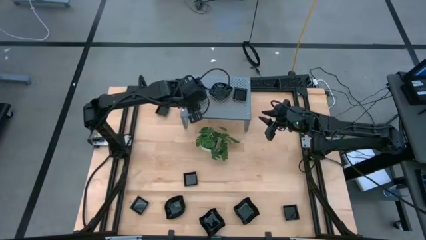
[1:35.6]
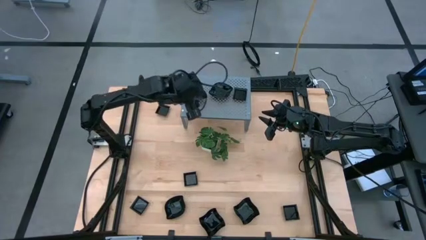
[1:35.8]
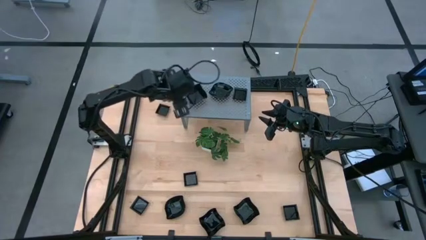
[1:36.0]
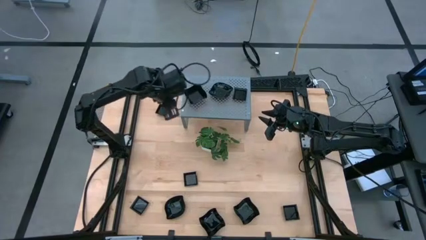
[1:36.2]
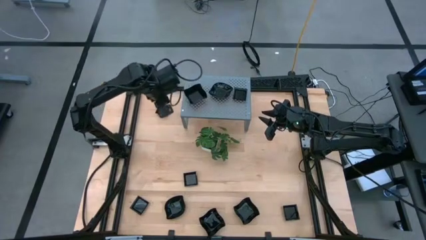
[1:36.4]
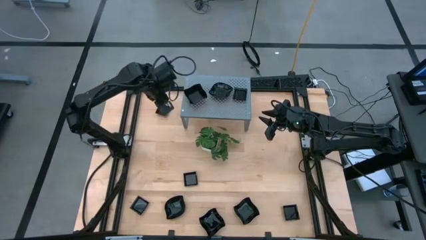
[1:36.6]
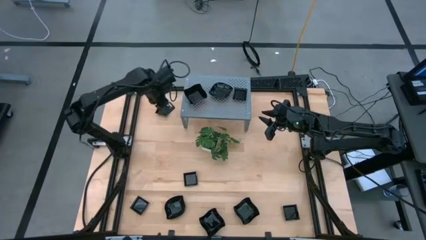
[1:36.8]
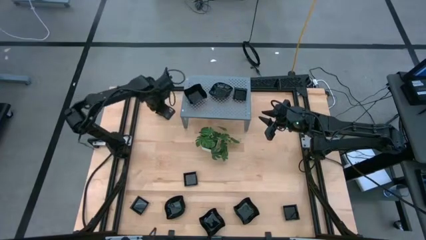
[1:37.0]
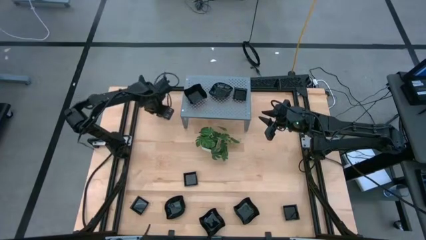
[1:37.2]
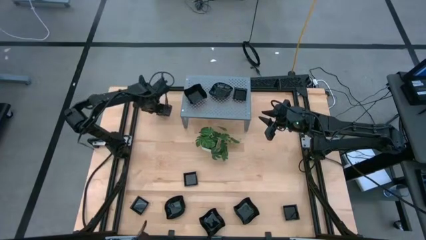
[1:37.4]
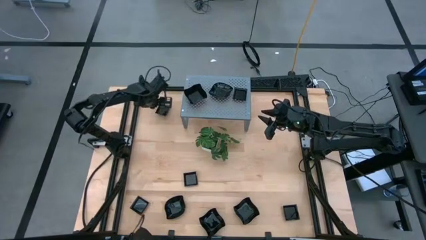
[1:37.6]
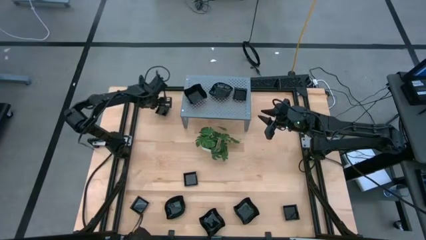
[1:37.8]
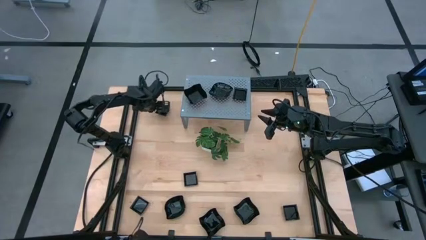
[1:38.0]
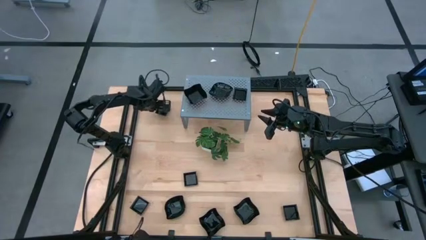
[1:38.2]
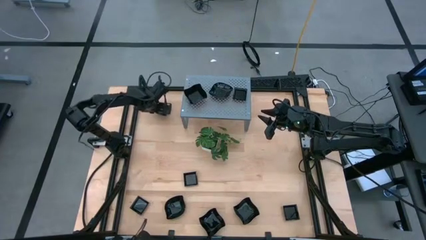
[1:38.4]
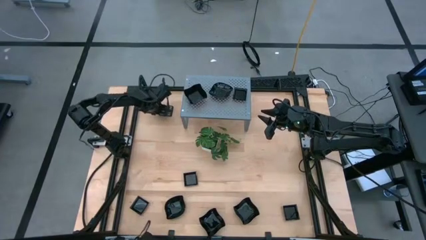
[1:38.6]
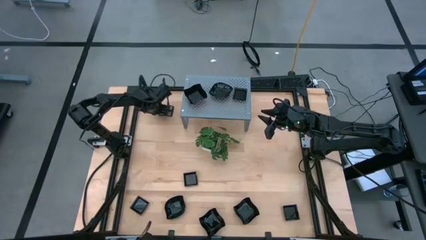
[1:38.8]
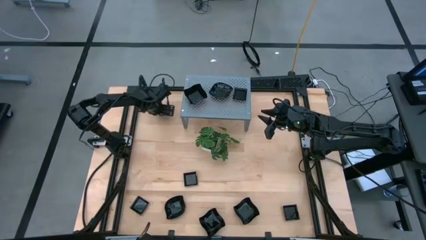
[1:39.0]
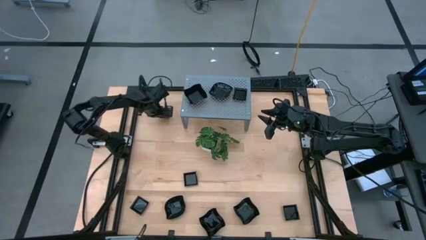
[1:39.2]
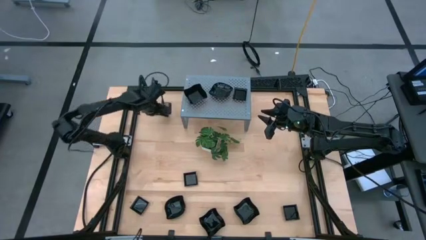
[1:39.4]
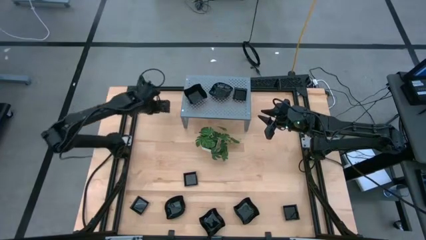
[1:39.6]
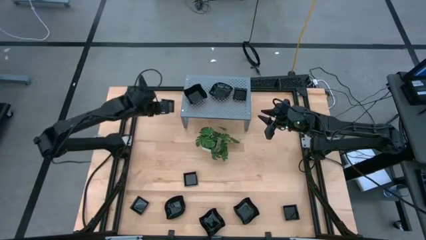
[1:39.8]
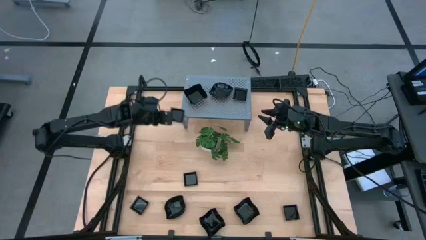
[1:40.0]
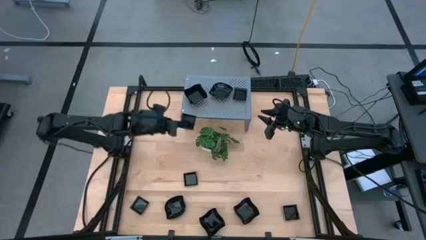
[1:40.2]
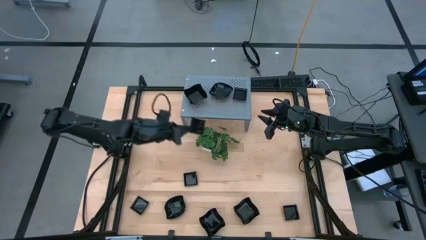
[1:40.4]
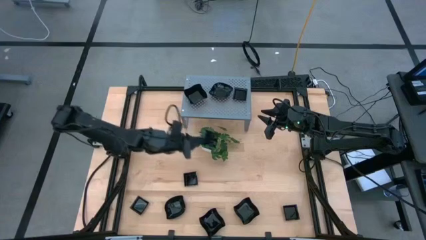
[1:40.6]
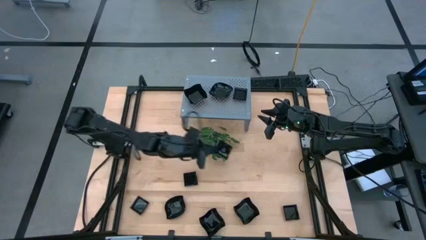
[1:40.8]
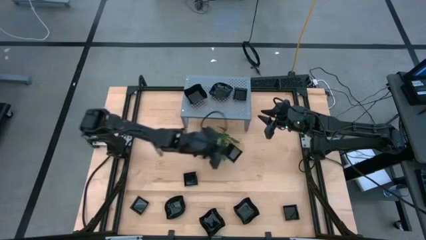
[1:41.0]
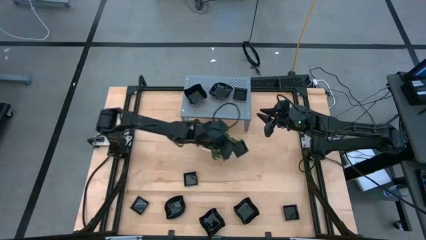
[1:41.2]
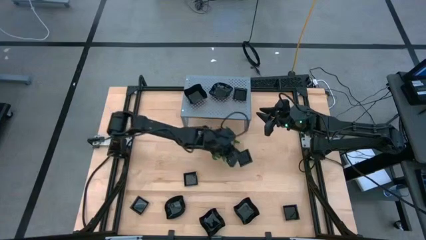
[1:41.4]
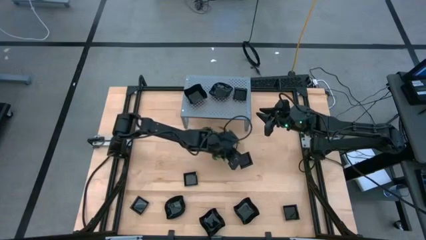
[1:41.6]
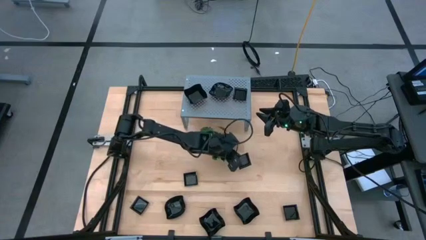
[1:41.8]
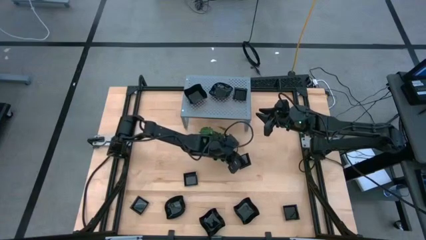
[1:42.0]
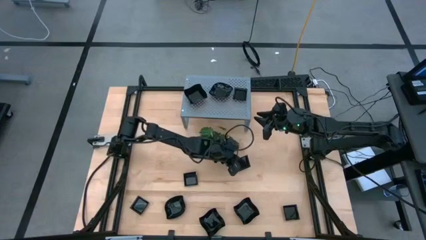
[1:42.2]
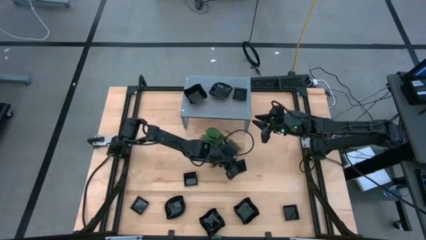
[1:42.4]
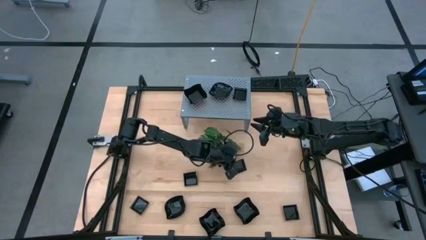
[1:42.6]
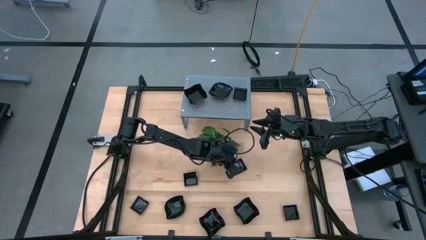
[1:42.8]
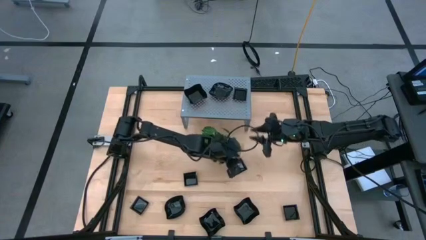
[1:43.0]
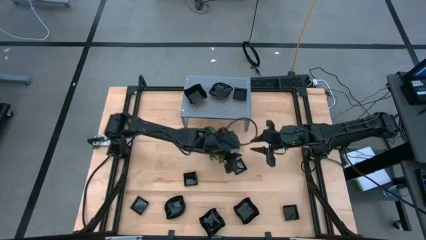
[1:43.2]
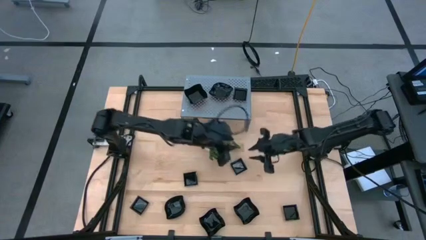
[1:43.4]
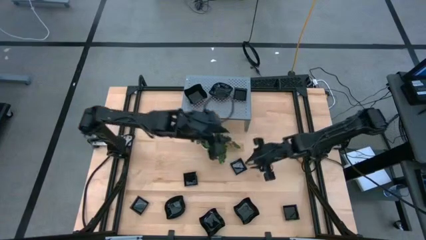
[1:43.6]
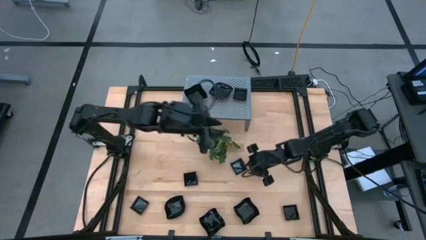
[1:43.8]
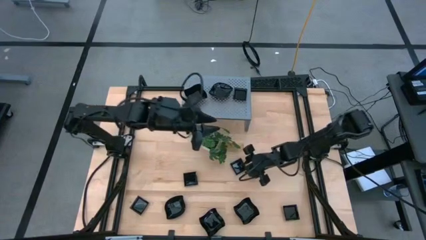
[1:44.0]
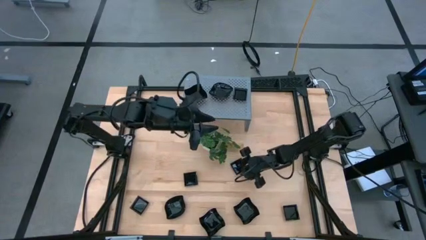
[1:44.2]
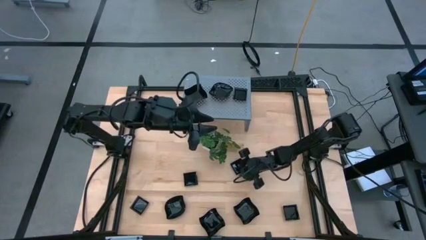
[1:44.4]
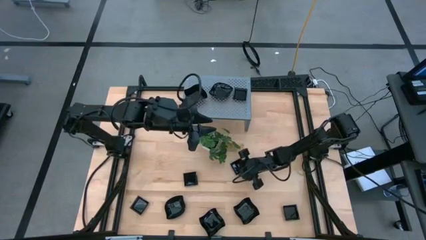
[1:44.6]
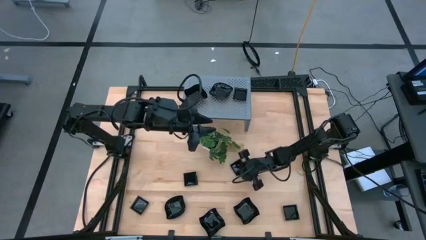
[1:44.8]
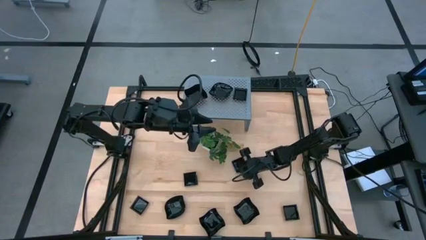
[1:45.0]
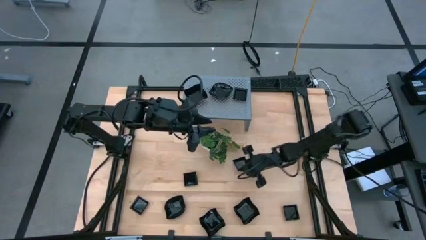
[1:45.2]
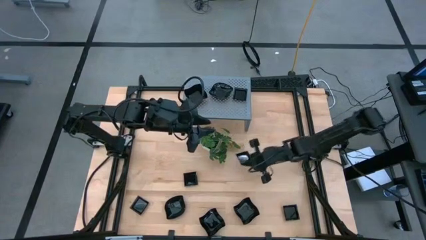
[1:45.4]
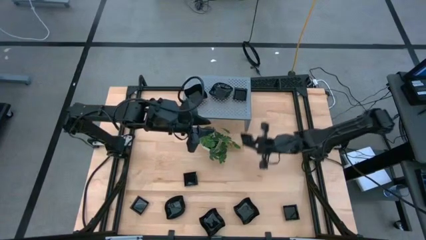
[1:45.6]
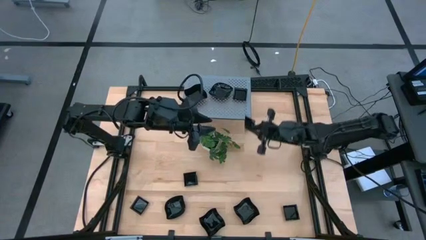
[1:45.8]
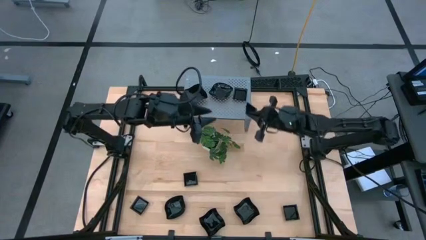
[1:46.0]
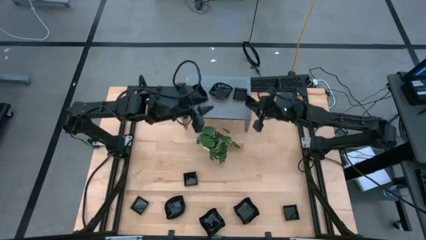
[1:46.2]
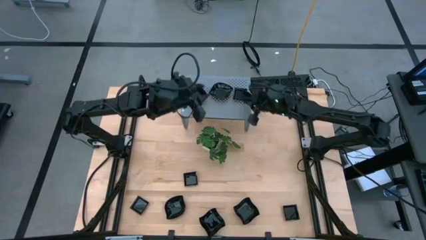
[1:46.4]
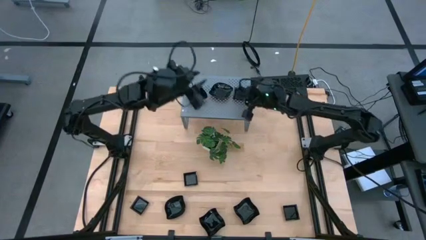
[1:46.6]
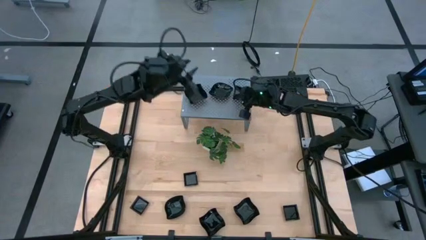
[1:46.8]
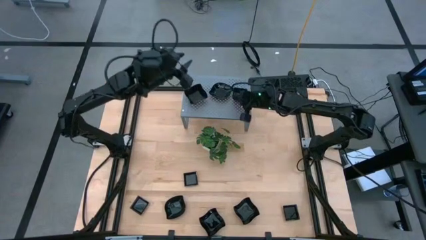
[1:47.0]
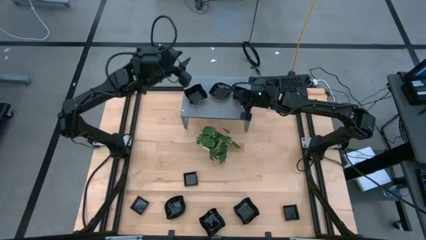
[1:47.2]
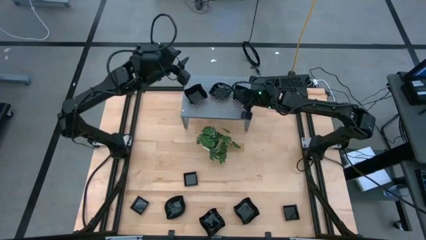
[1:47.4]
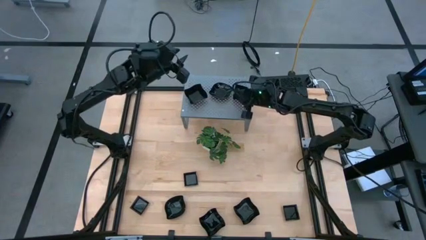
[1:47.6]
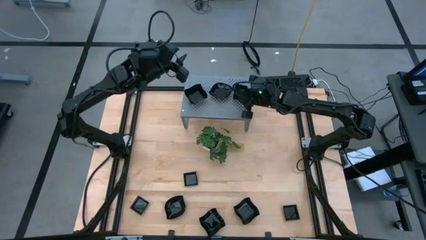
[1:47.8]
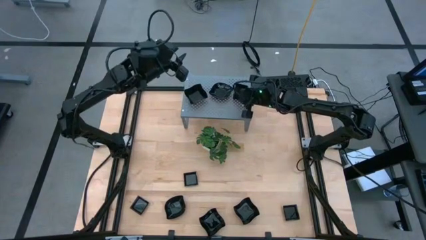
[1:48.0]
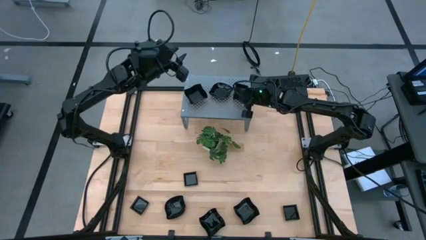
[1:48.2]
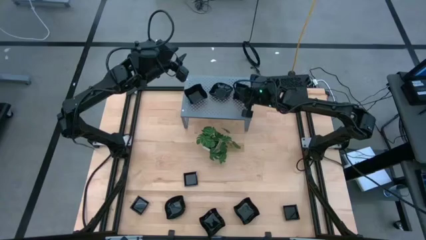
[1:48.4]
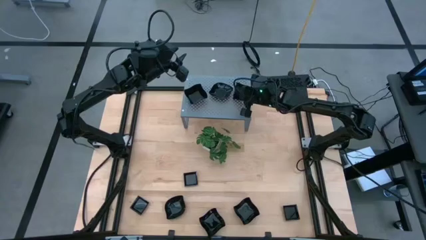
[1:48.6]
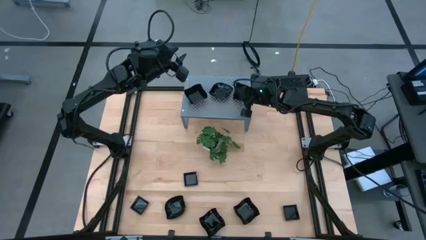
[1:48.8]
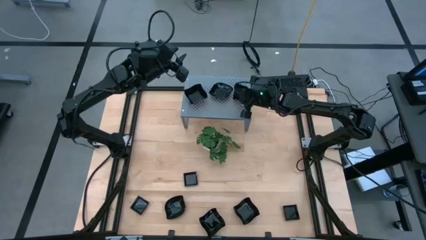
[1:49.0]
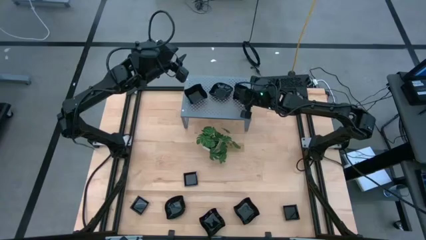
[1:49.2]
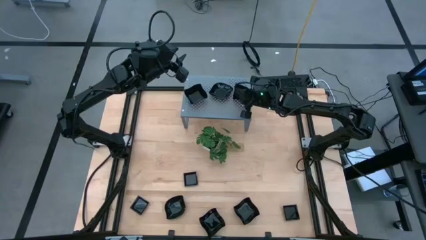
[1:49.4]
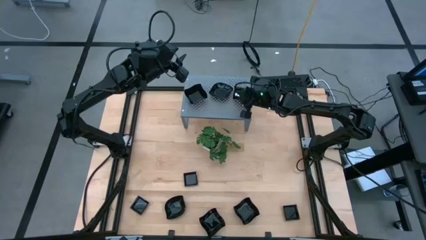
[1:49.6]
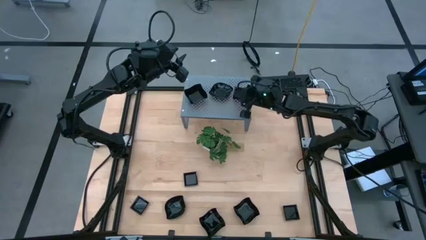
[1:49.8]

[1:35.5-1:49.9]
Task: Pick & Place Mini shaped plates
Stack the square plate on top of the stacked square plates on the shelf
